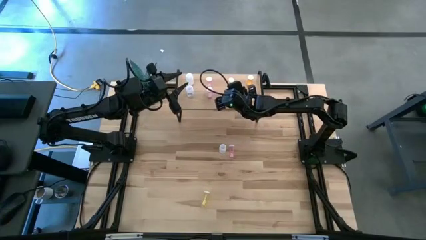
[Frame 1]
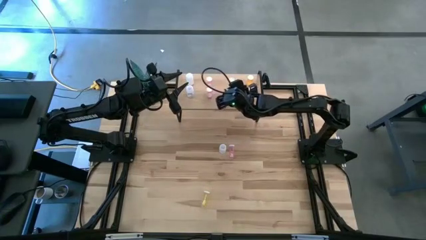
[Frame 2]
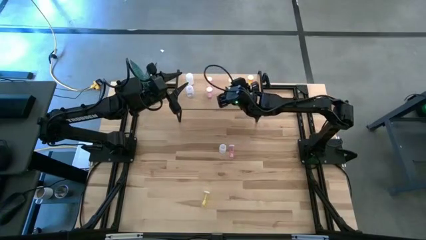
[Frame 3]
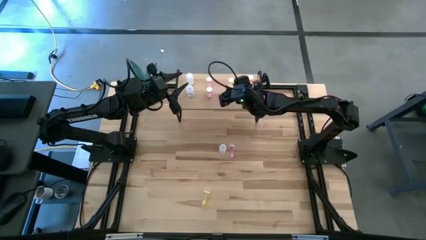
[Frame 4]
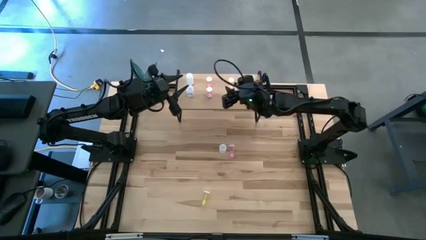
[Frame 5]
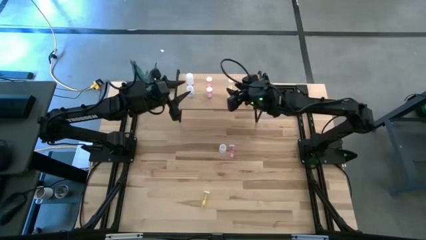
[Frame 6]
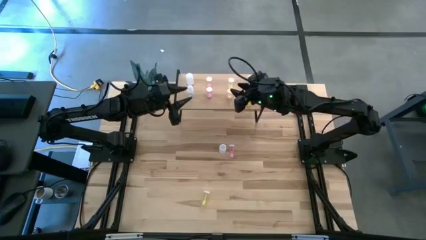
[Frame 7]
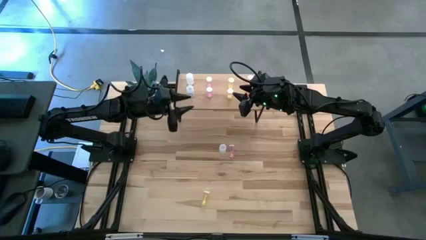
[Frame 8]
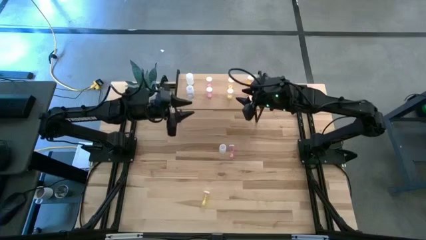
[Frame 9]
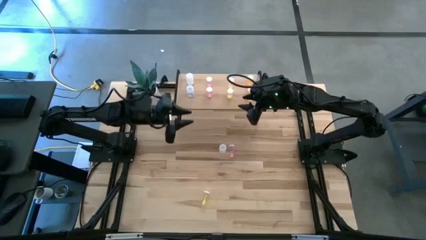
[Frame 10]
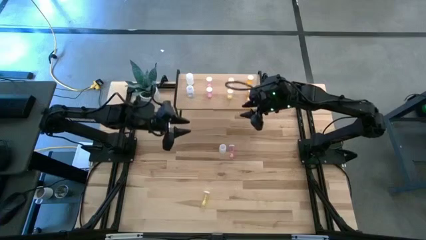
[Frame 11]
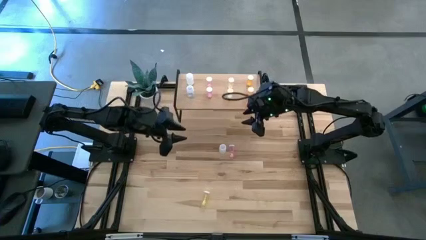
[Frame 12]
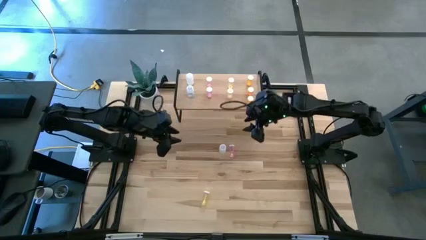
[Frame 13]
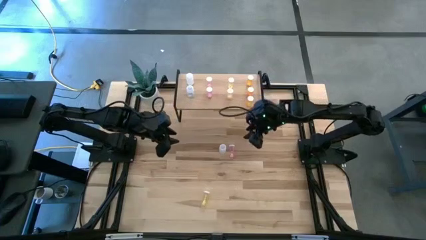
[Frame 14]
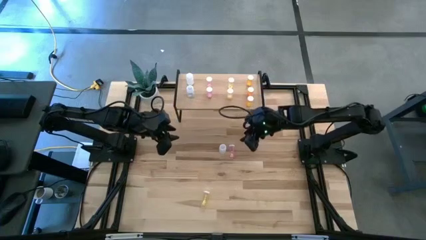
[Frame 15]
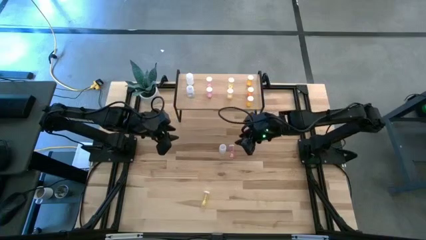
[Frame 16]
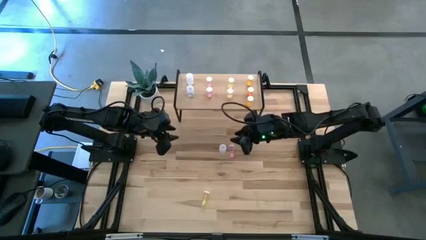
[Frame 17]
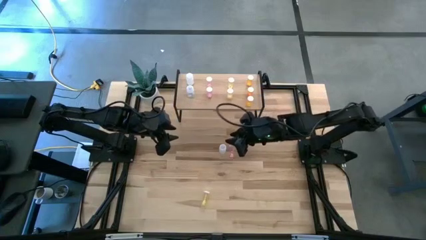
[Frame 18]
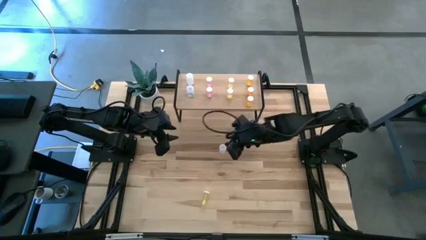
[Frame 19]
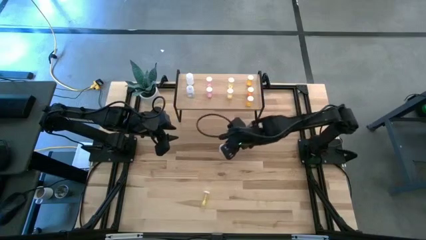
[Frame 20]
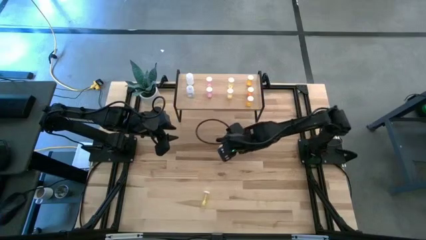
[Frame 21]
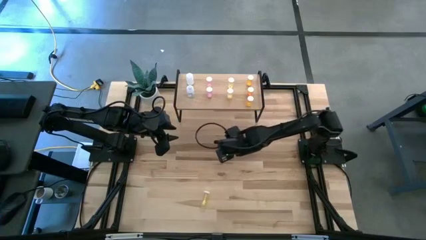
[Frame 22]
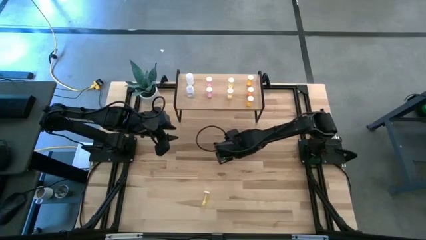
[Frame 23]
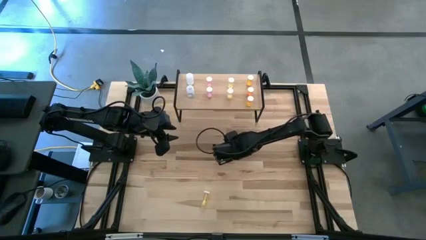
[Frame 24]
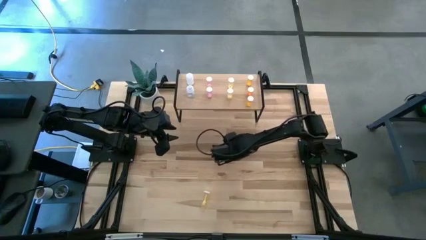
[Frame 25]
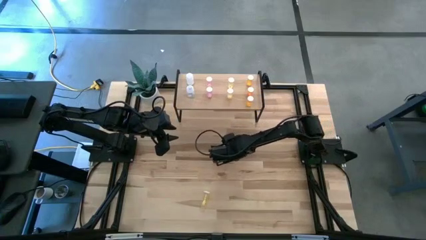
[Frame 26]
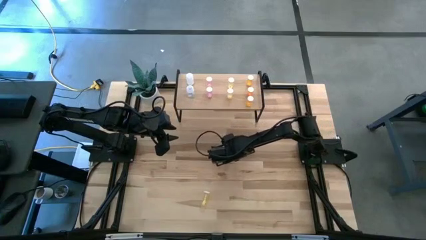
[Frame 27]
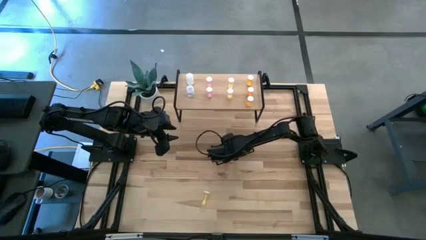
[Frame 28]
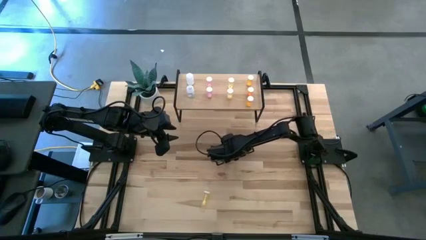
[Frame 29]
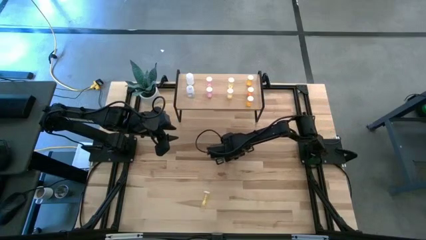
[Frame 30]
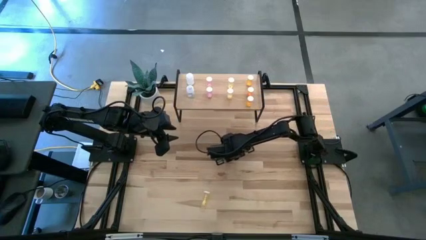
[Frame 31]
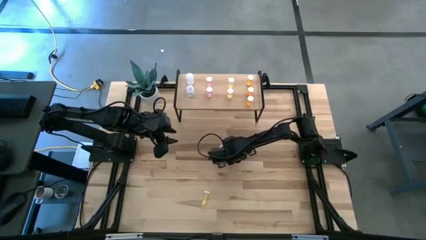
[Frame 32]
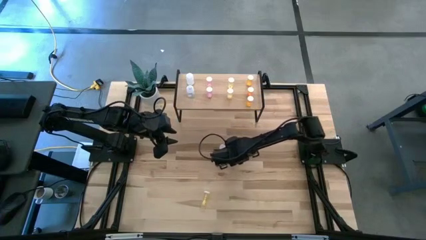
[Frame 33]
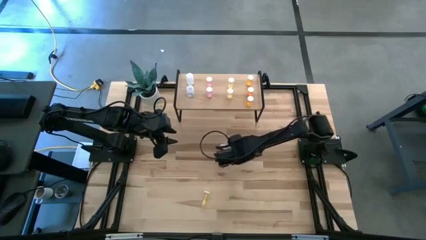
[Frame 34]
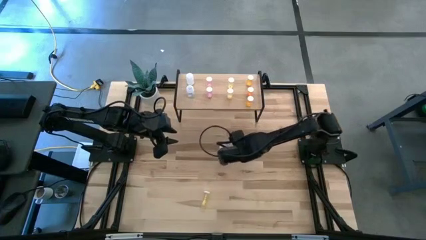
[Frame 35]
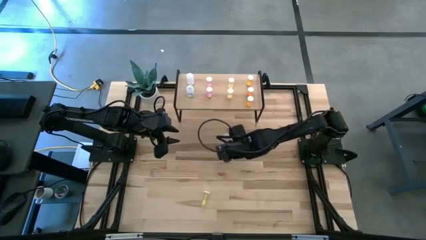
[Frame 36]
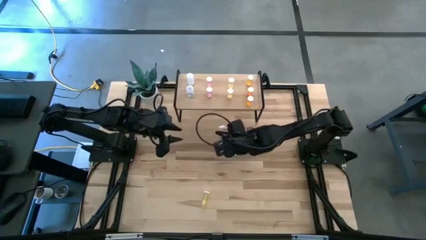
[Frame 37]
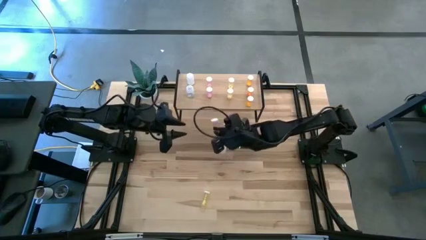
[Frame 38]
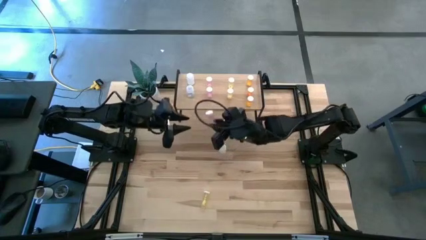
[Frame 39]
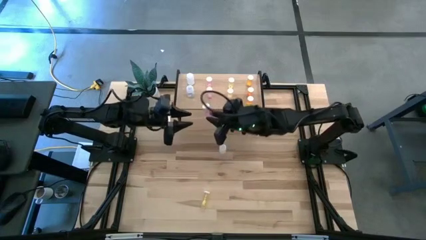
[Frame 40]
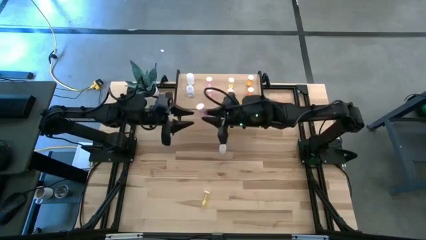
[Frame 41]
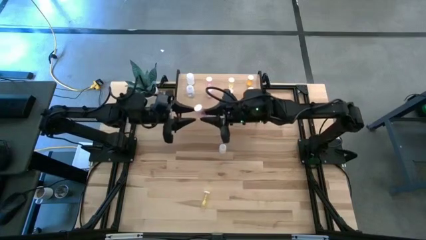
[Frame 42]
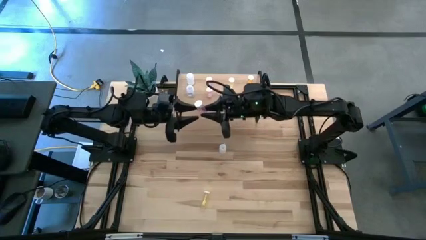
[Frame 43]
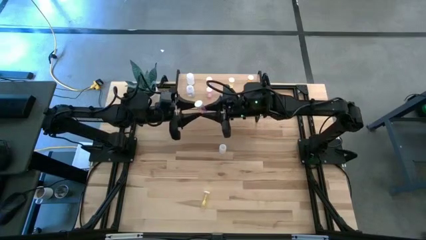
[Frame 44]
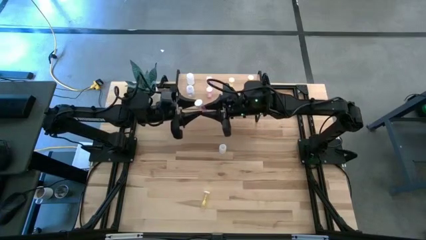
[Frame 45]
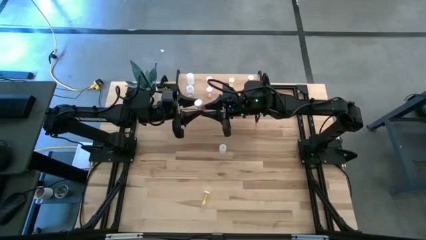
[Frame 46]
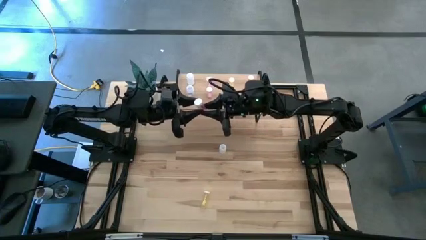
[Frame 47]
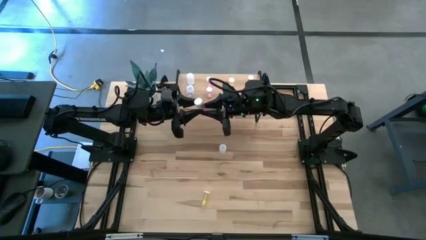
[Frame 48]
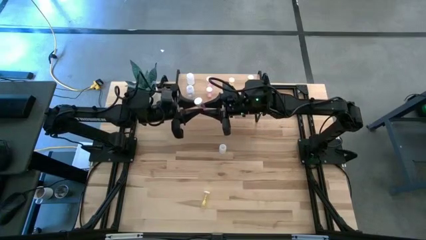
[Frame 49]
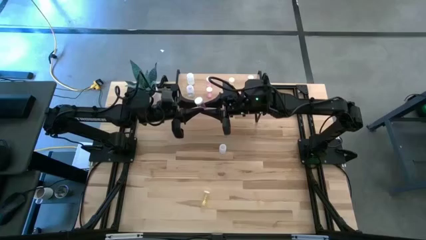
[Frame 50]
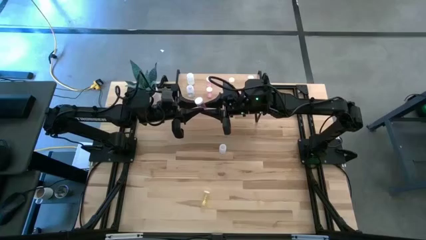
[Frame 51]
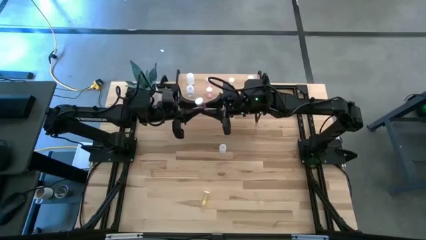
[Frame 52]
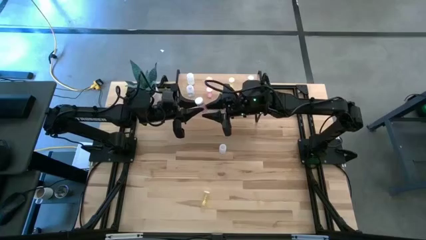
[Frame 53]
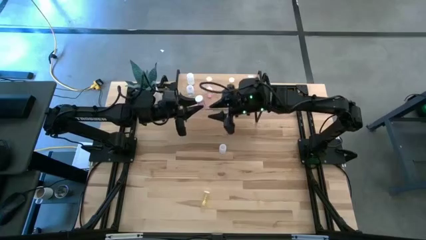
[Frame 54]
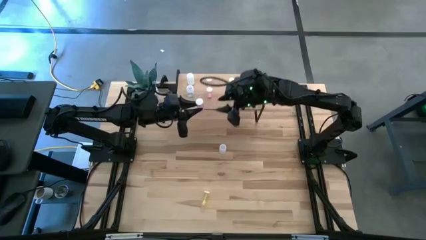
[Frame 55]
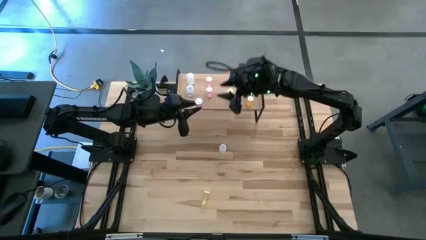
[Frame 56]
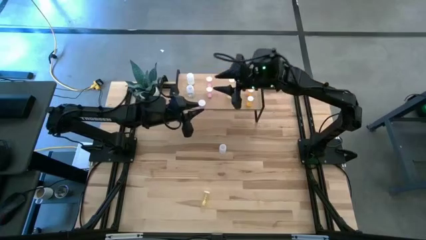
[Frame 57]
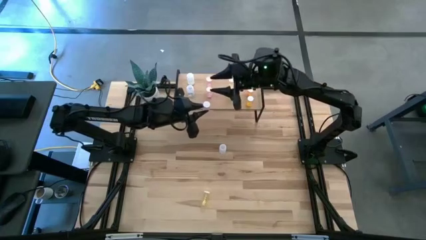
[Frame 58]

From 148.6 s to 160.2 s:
Task: Pick and place medicine bottles onto shelf by color
Put the pink pill bottle aligned with the other pink pill bottles on the shelf
